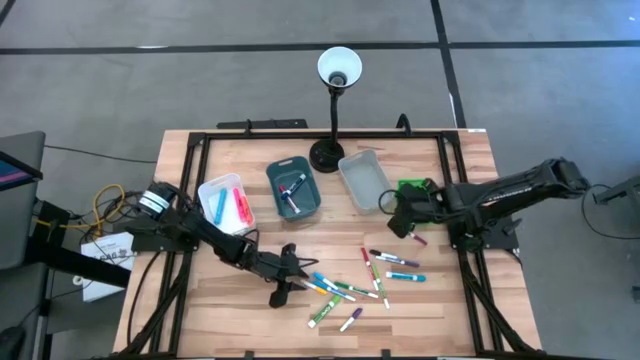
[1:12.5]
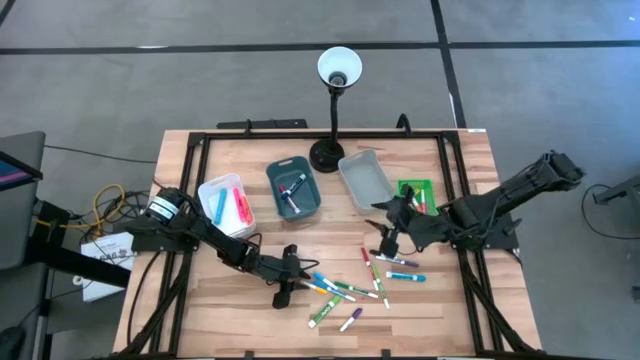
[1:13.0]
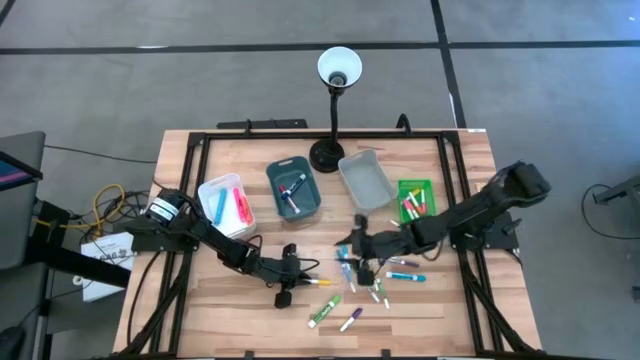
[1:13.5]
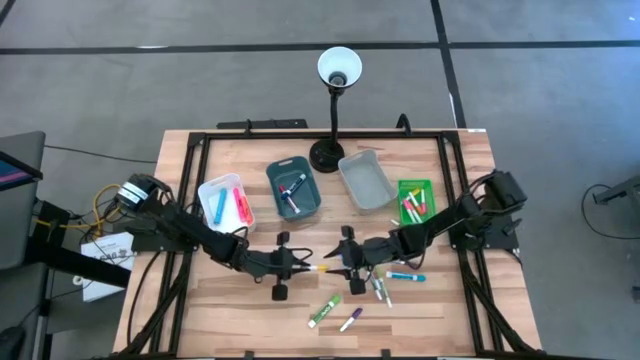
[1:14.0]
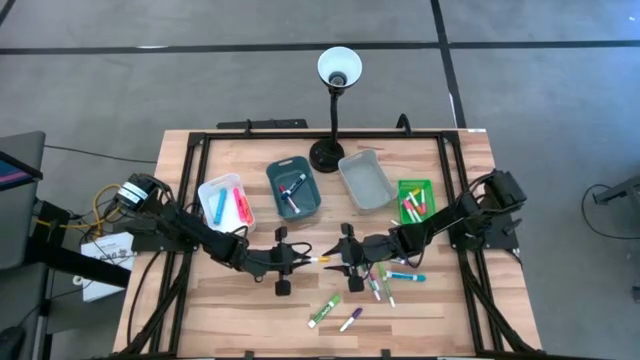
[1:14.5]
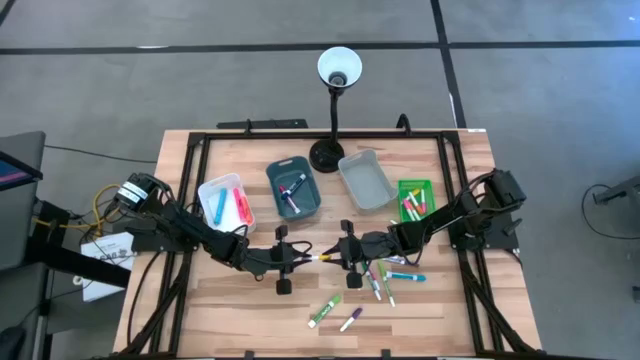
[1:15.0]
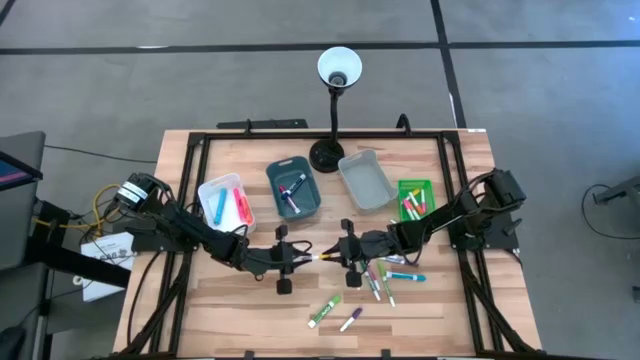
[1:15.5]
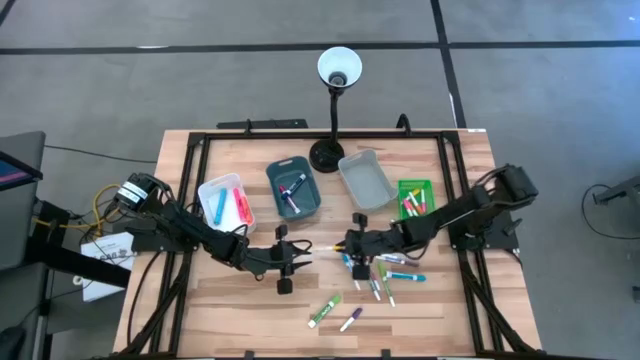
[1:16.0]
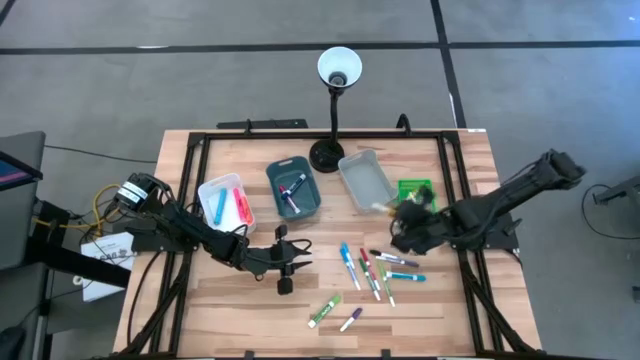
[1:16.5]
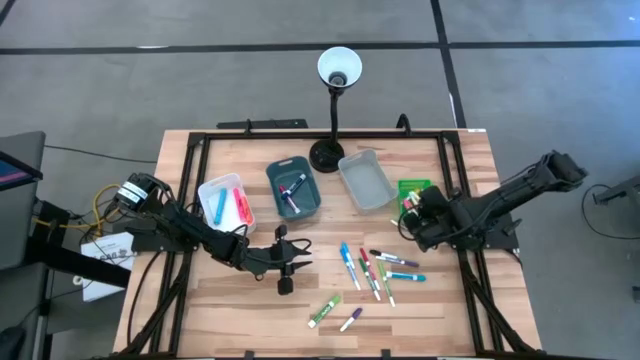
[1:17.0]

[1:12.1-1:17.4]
Task: Pick & Place Markers
Put the yellow highlighter pen into the green bin

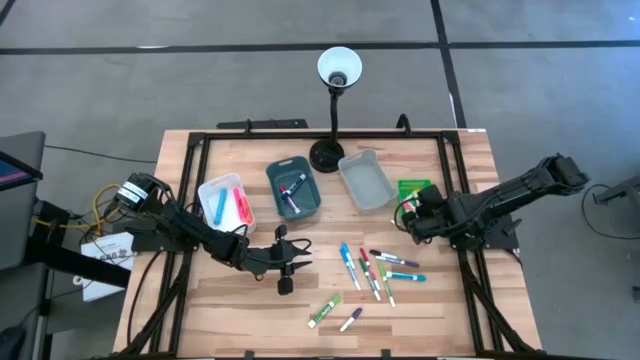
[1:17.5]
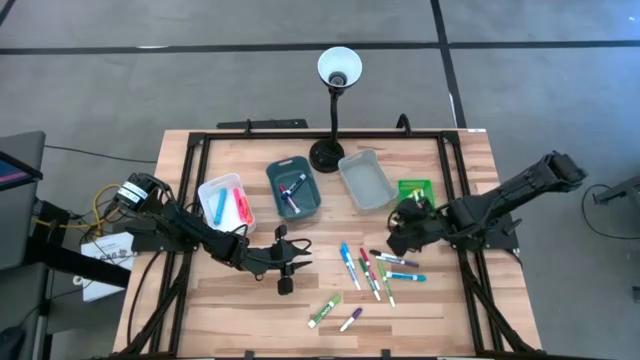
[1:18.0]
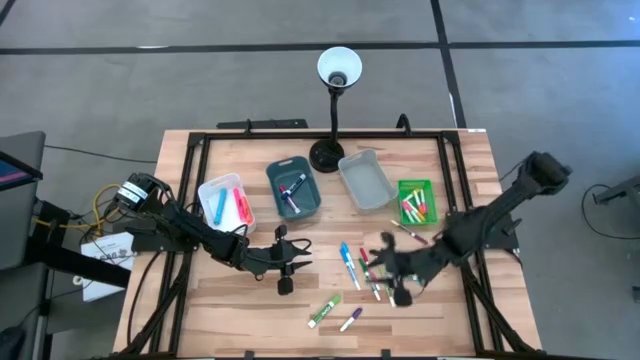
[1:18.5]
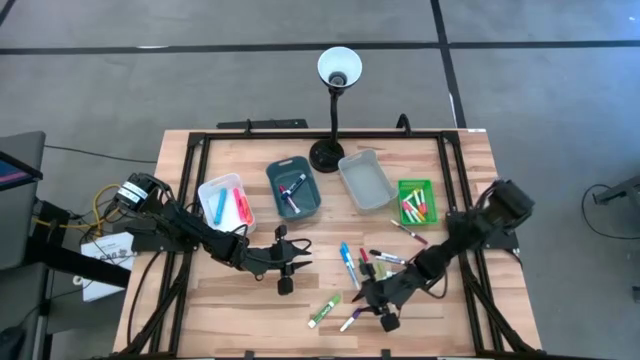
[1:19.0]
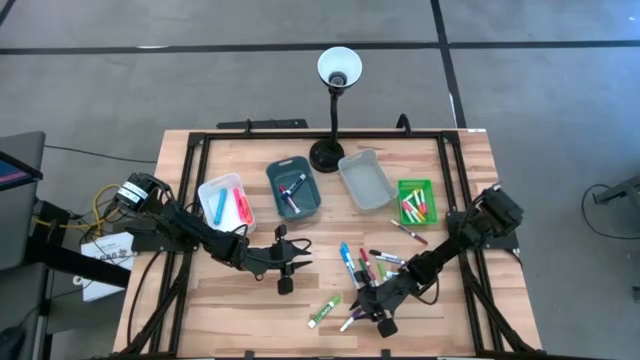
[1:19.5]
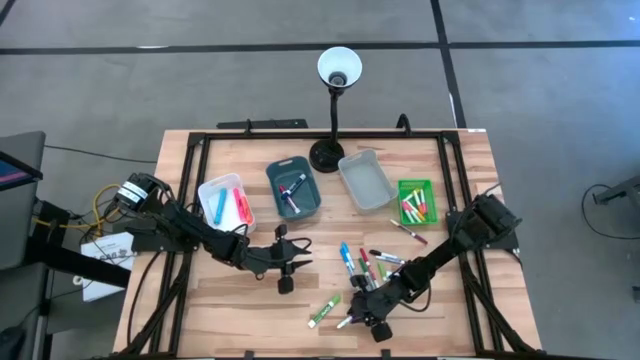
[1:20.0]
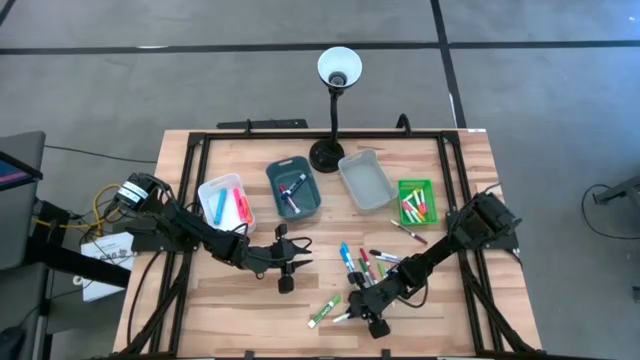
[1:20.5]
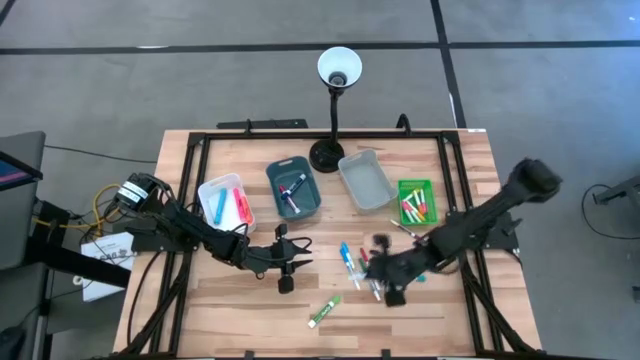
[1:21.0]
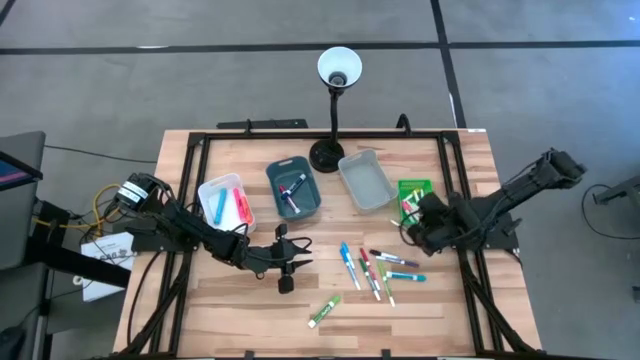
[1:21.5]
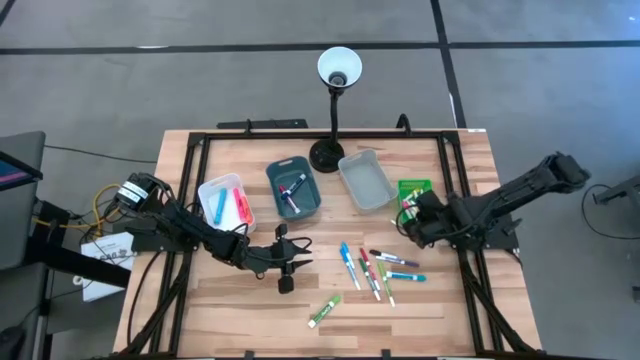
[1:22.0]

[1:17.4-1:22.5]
Put the violet highlighter pen into the green bin

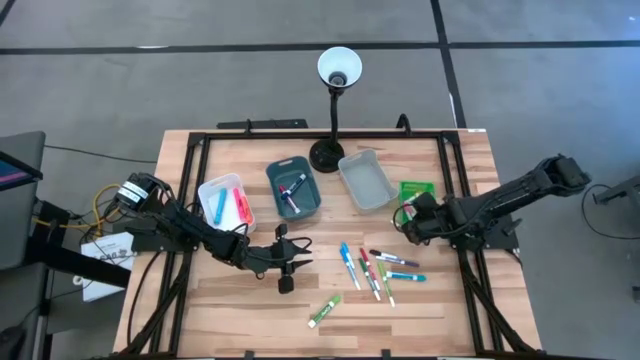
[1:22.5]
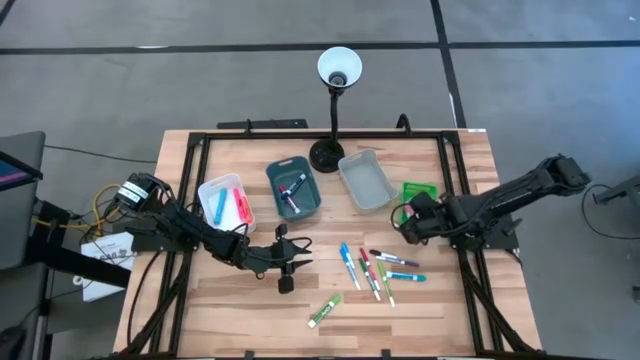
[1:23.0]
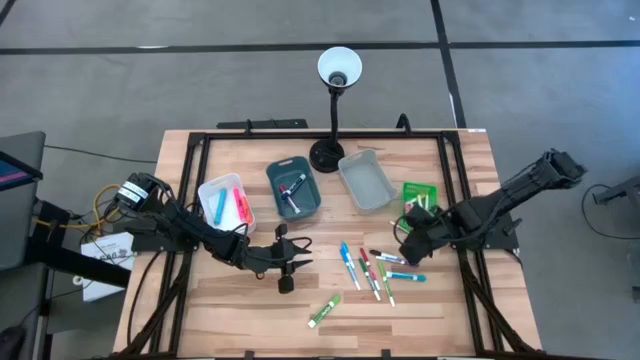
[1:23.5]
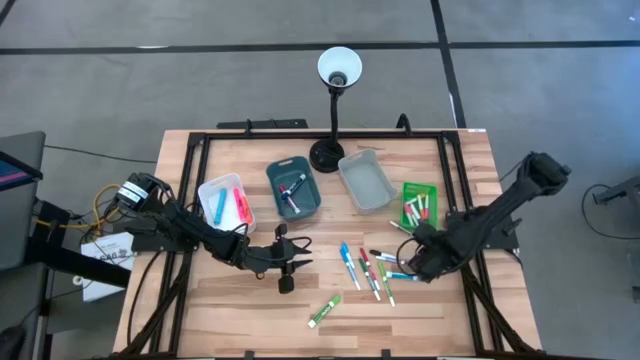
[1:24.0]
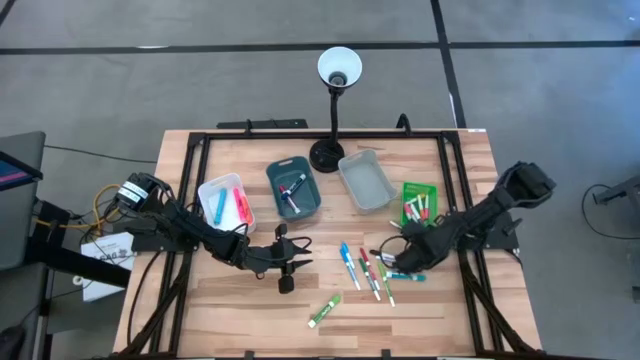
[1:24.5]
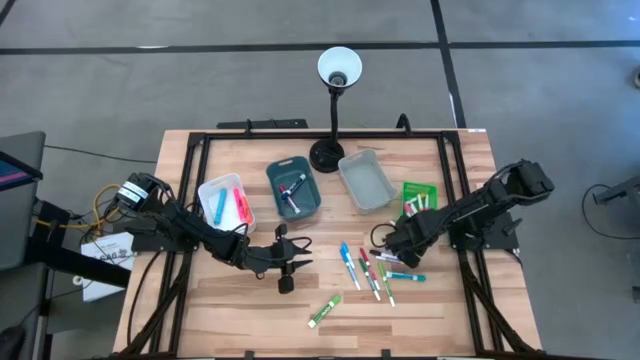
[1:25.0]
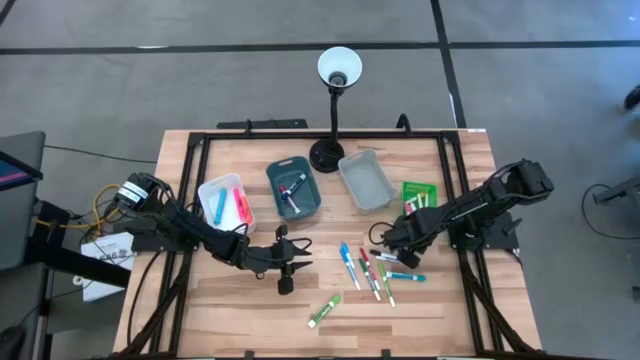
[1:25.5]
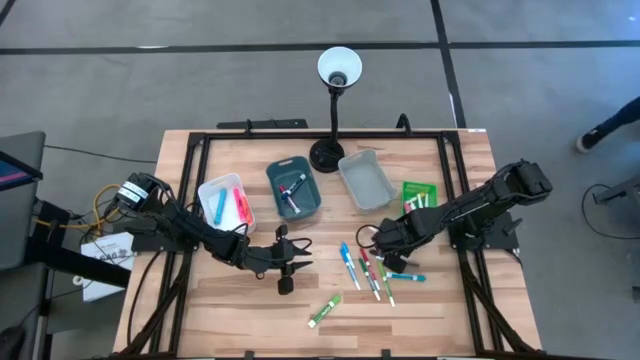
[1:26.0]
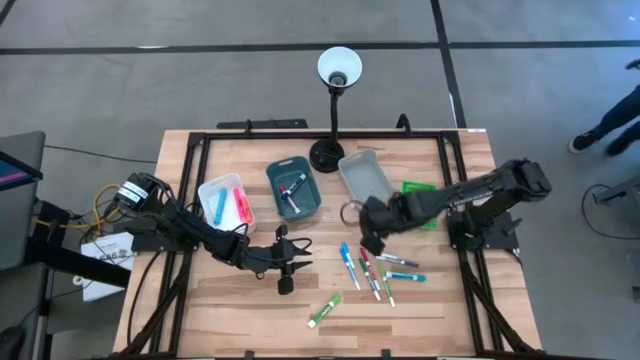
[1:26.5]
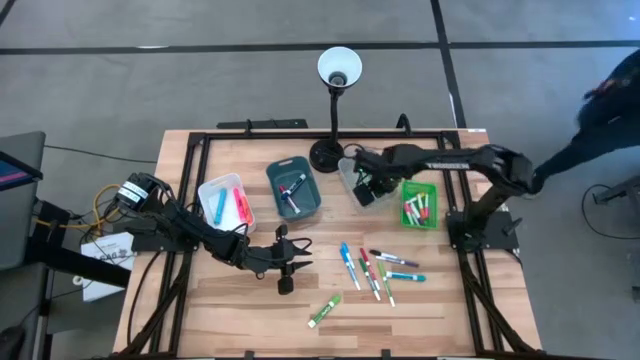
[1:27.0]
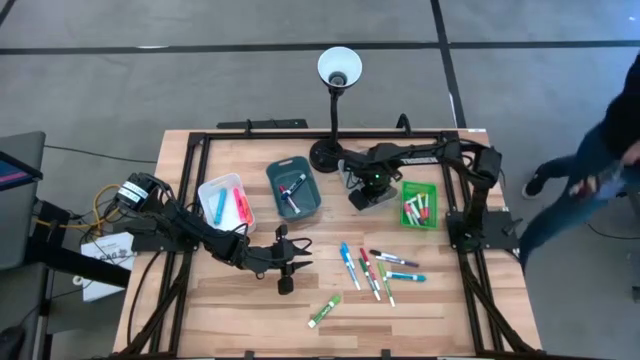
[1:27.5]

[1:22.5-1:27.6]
Put the dark red small marker pen into the gray bin

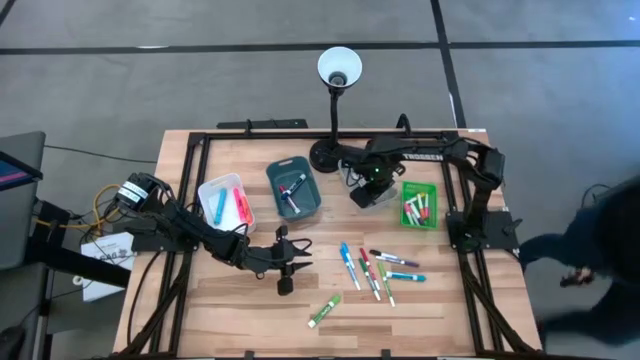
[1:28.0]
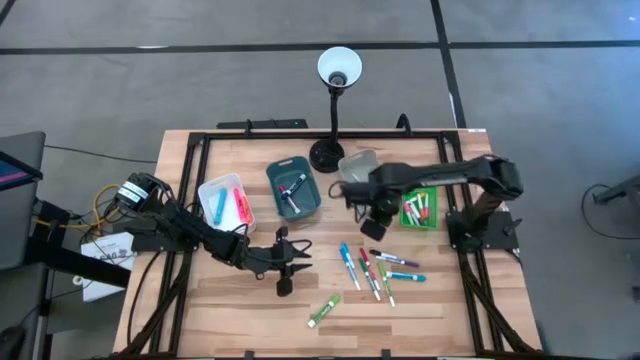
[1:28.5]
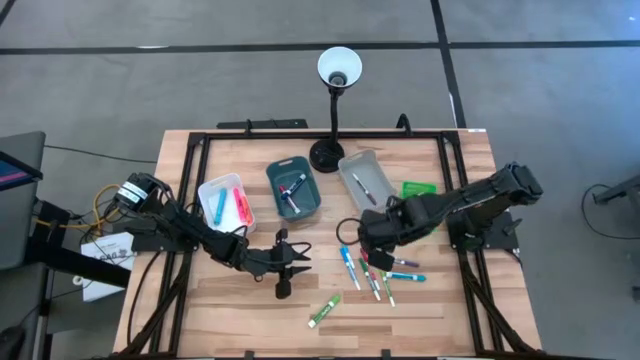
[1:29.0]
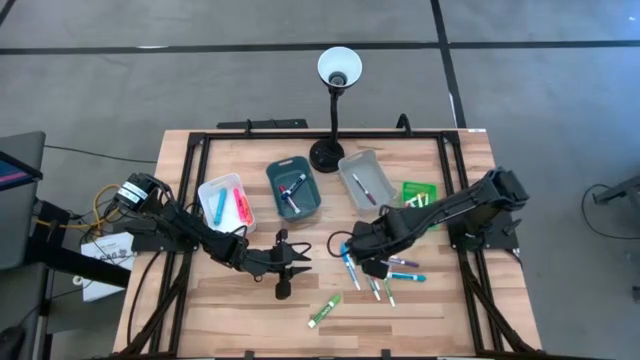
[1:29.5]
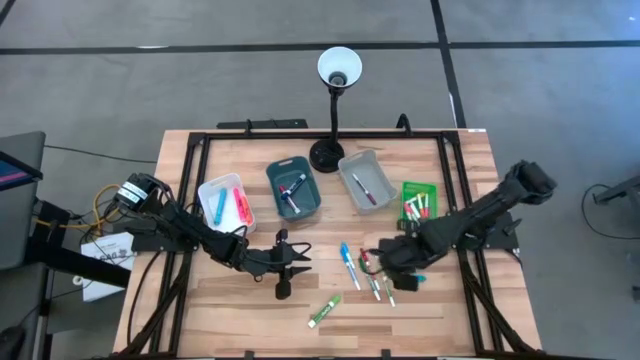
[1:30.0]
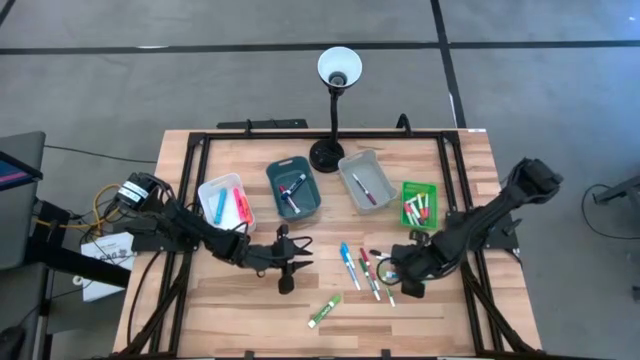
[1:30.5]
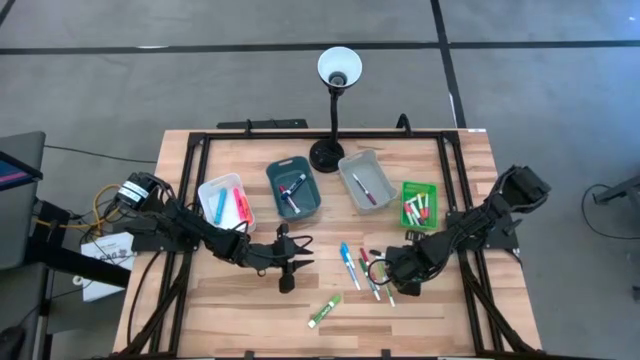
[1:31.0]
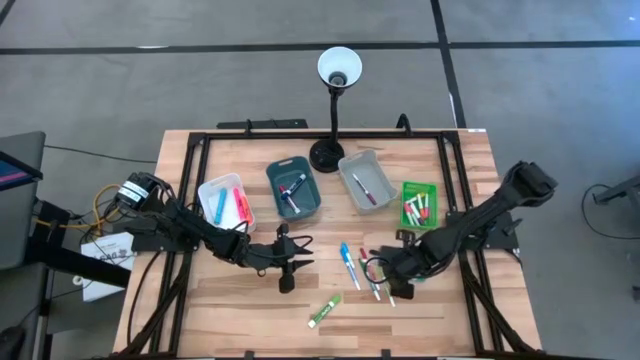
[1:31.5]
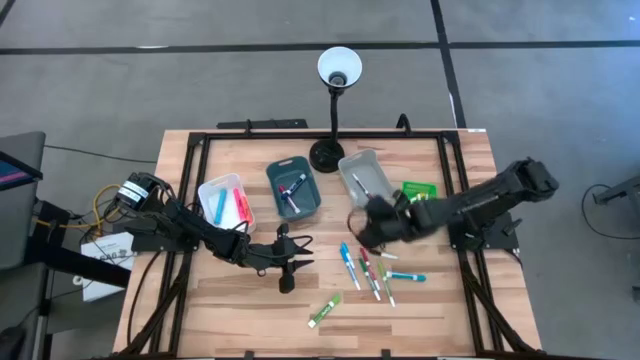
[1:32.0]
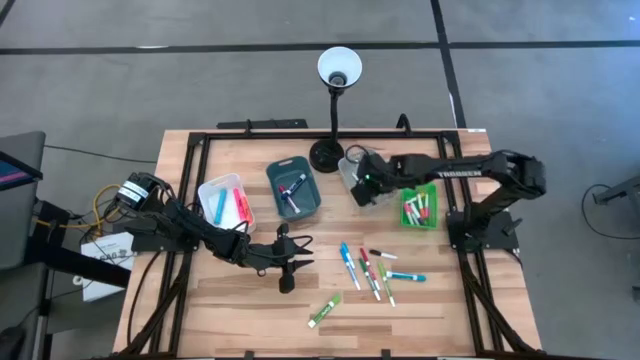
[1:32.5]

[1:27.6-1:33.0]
Put the blue small marker pen into the gray bin
